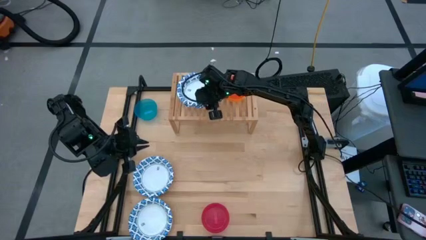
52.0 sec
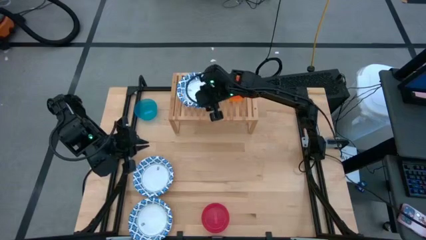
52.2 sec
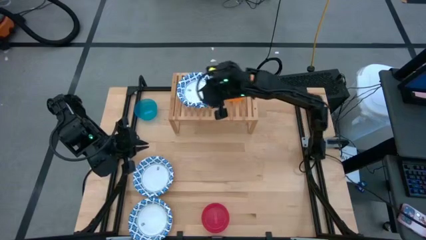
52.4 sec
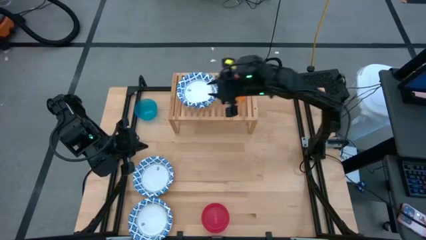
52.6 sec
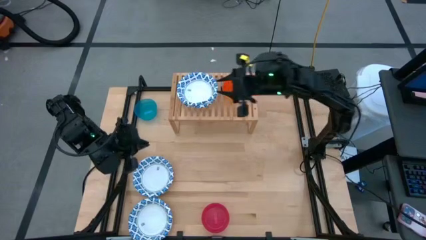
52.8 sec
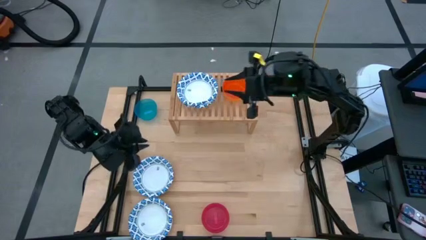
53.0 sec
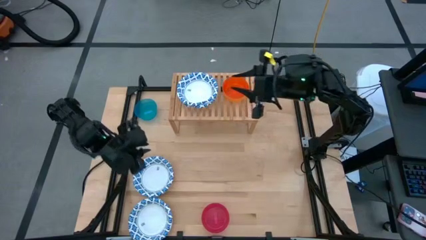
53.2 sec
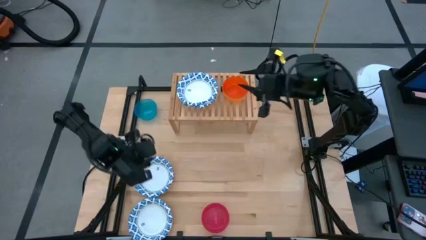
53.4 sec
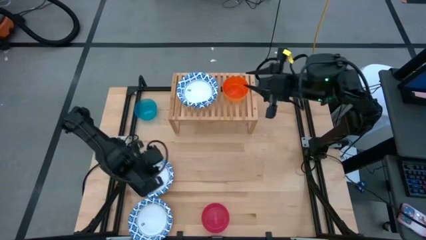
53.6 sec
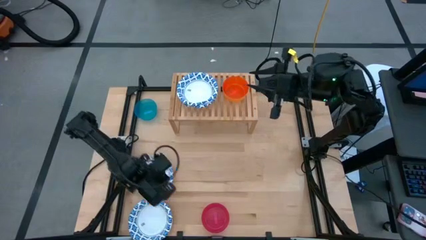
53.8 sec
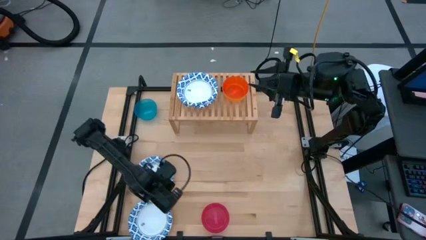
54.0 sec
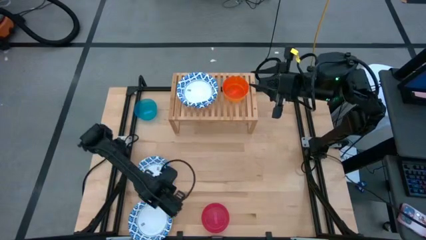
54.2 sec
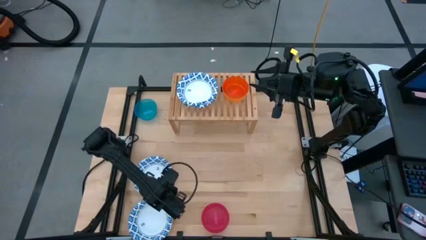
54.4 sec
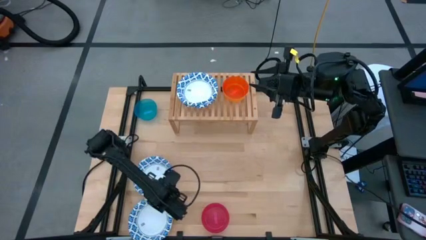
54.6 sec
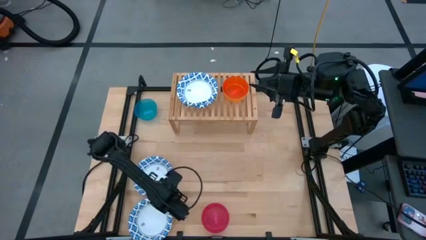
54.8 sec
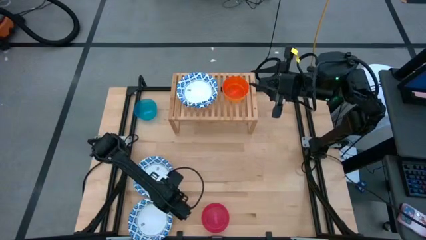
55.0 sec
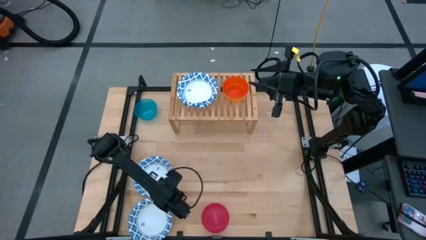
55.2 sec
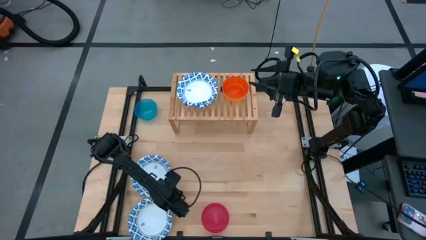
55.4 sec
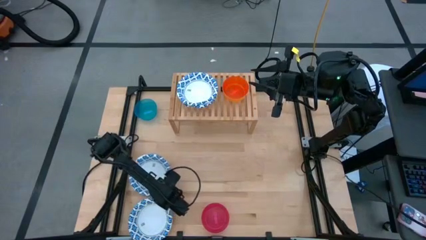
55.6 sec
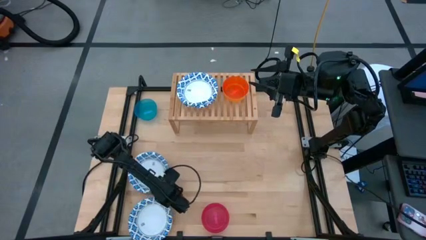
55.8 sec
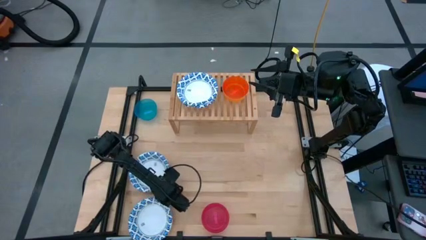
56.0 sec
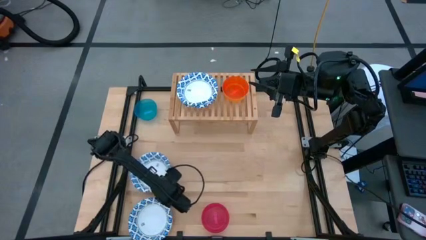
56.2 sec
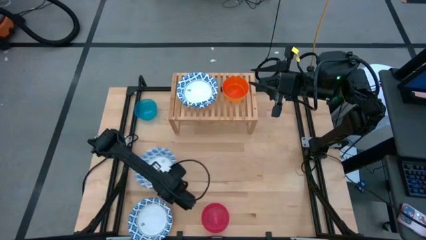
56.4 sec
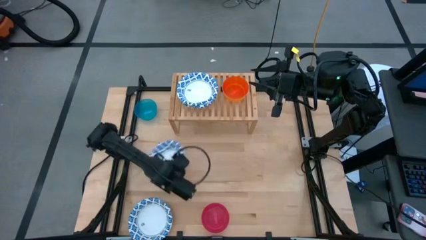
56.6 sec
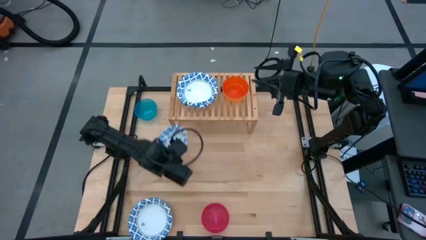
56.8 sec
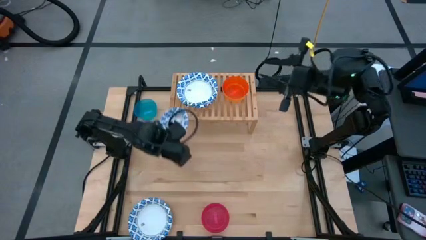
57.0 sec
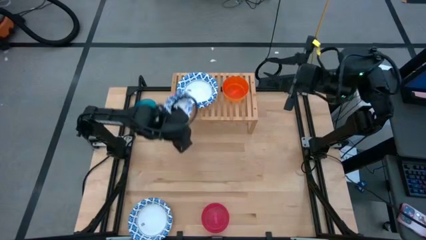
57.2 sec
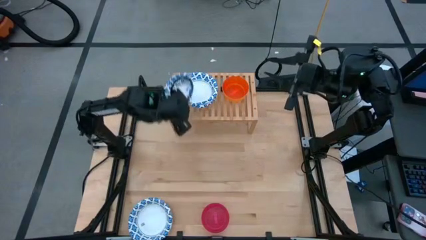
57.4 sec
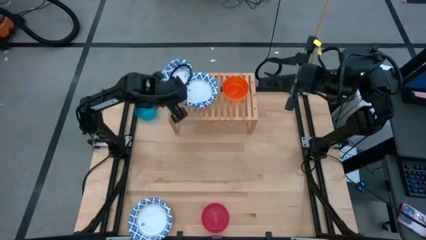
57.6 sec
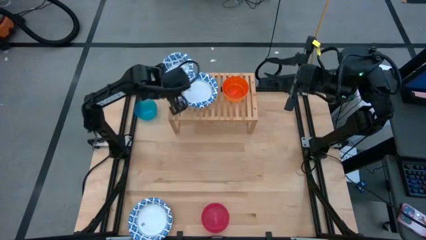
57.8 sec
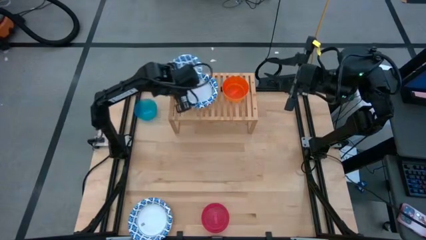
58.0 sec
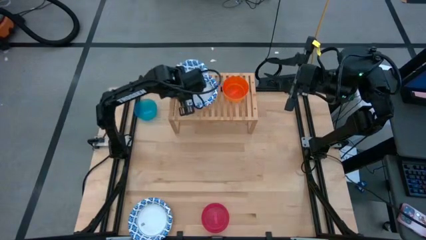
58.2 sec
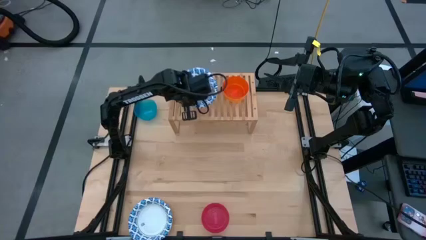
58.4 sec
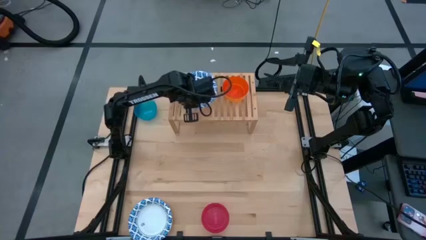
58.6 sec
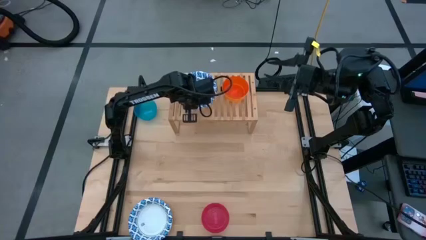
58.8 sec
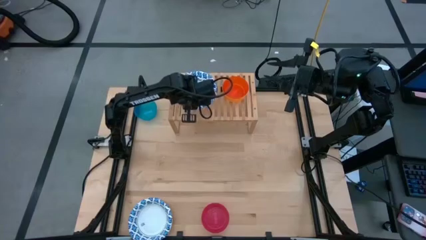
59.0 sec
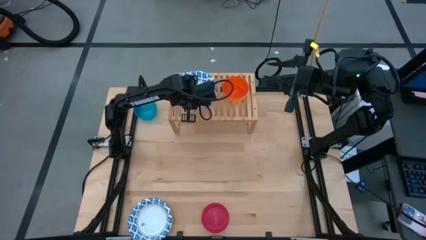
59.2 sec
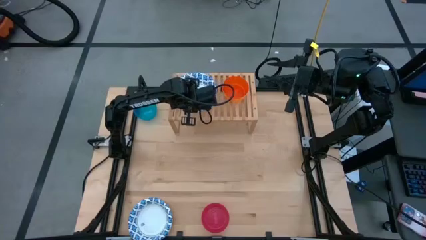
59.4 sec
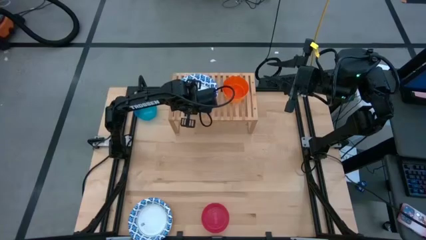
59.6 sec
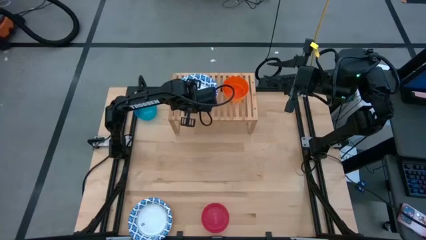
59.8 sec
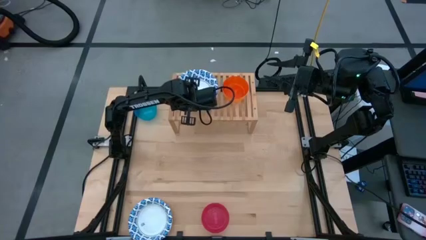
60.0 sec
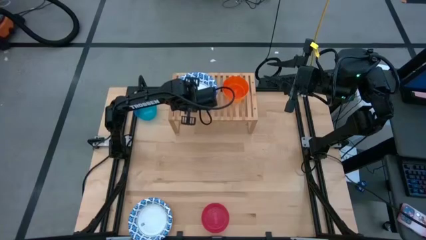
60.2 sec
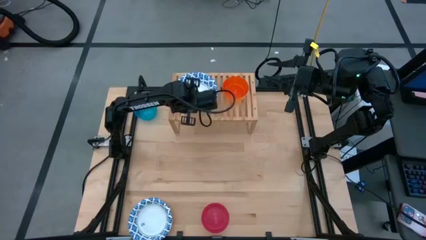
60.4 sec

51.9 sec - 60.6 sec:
Task: Place and stack bowls onto a shelf
Stack the top white patterned bowl on top of the white patterned bowl on the shelf

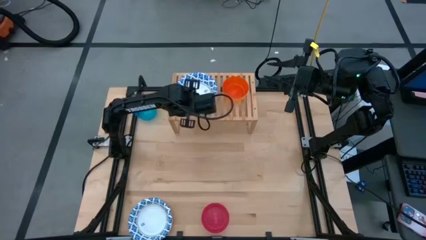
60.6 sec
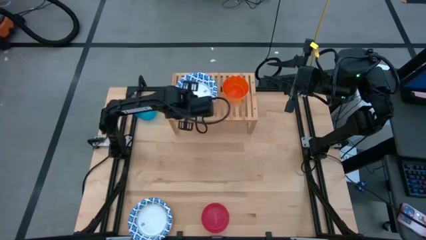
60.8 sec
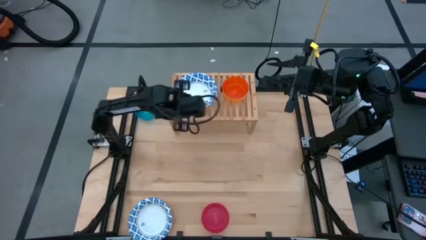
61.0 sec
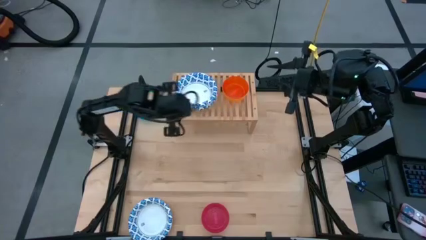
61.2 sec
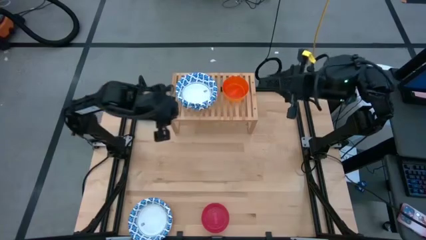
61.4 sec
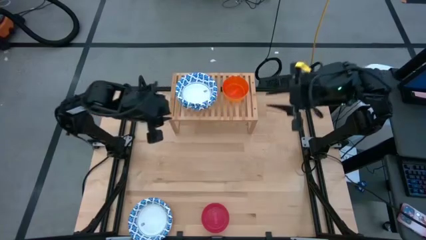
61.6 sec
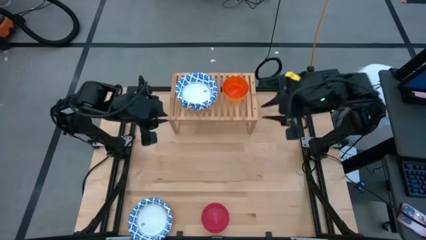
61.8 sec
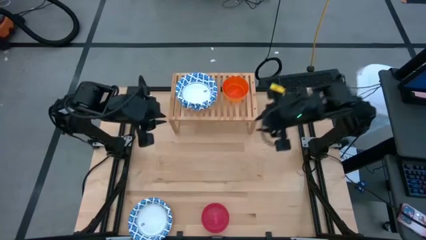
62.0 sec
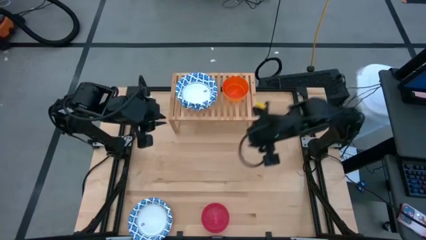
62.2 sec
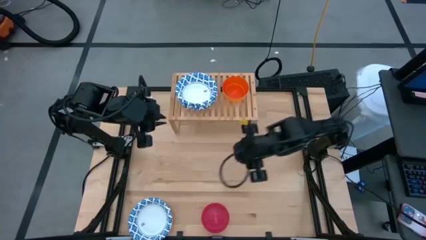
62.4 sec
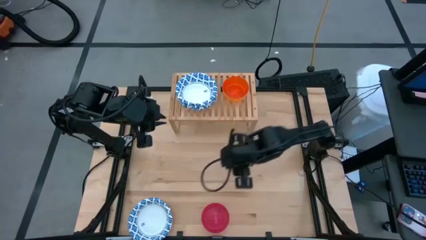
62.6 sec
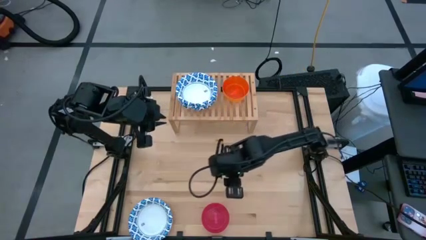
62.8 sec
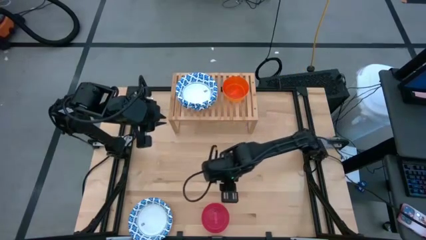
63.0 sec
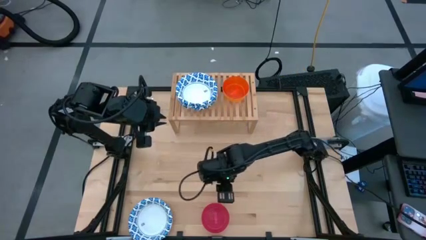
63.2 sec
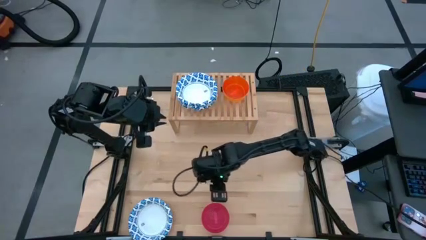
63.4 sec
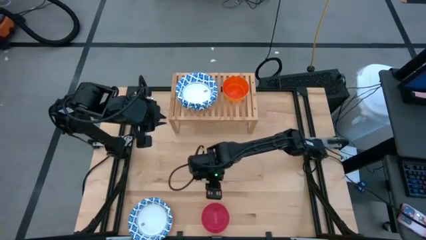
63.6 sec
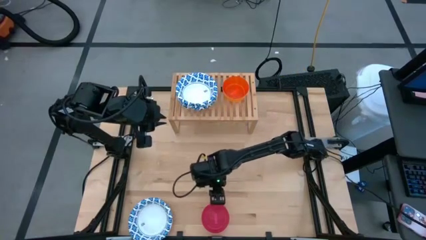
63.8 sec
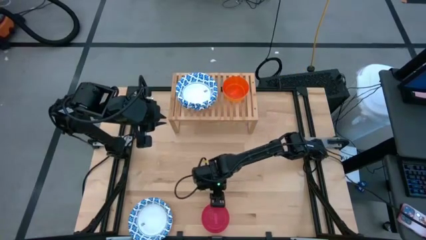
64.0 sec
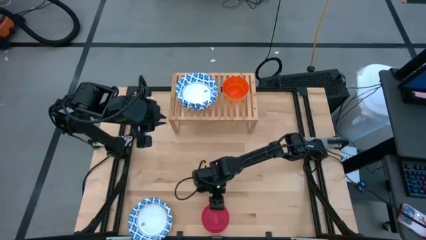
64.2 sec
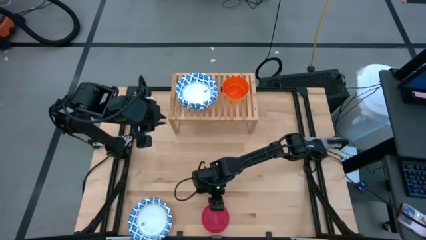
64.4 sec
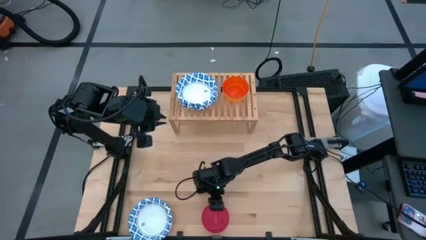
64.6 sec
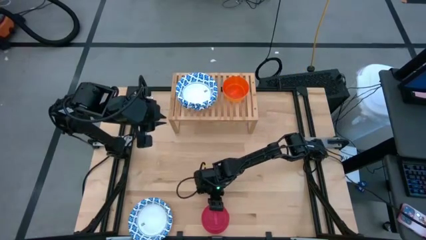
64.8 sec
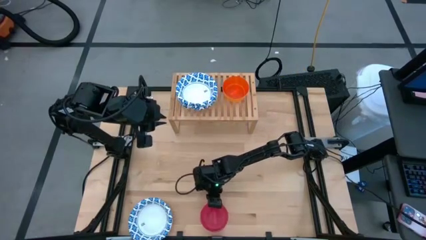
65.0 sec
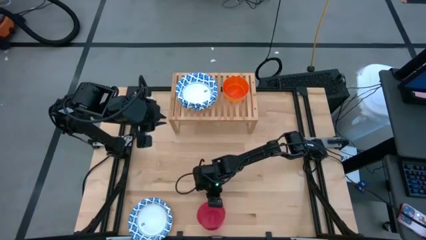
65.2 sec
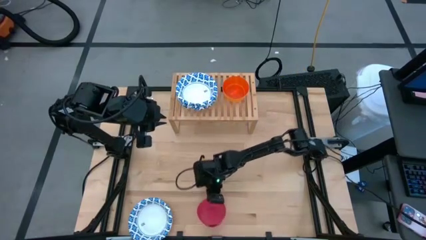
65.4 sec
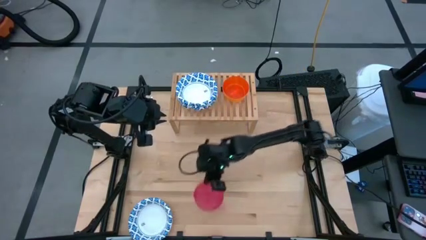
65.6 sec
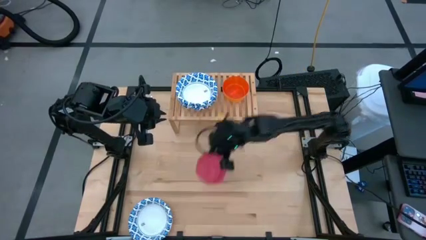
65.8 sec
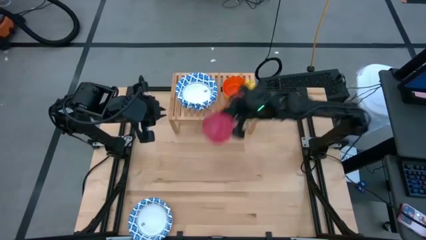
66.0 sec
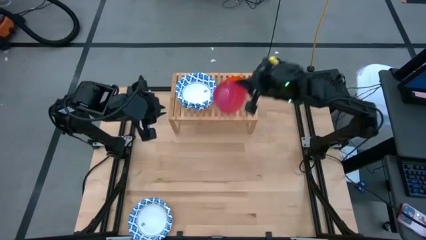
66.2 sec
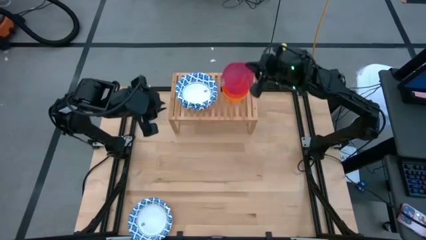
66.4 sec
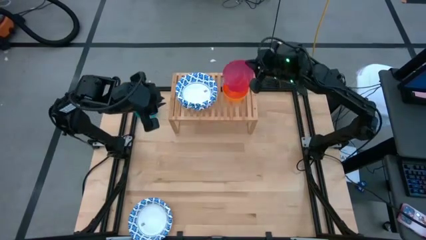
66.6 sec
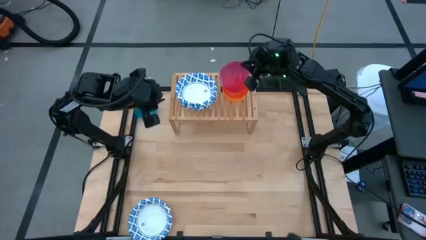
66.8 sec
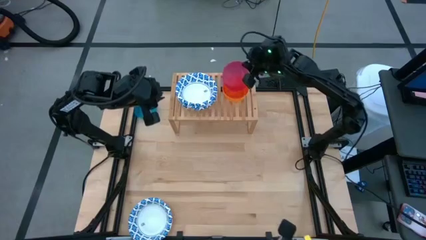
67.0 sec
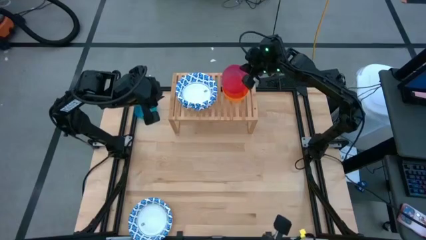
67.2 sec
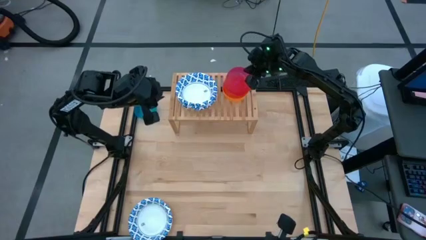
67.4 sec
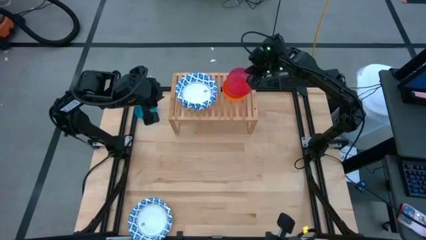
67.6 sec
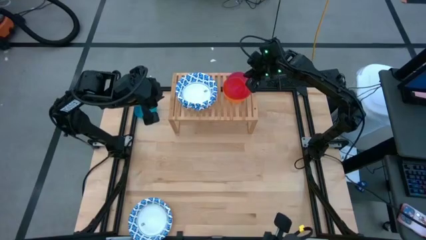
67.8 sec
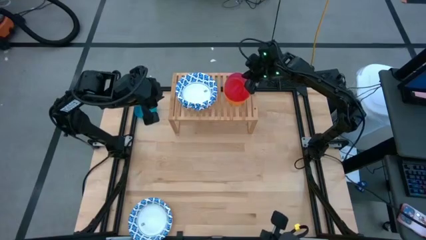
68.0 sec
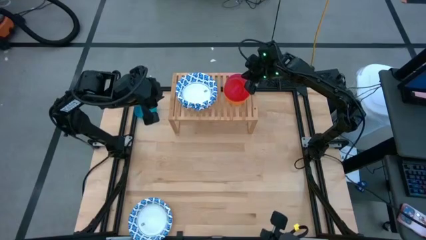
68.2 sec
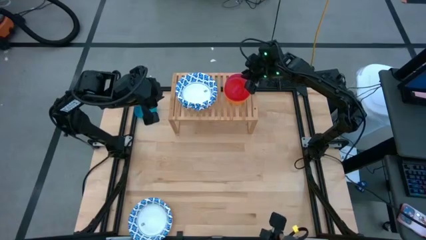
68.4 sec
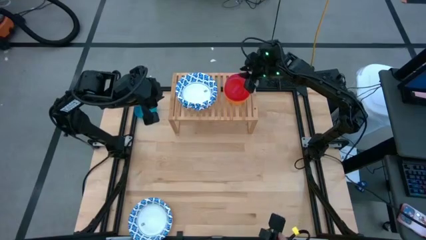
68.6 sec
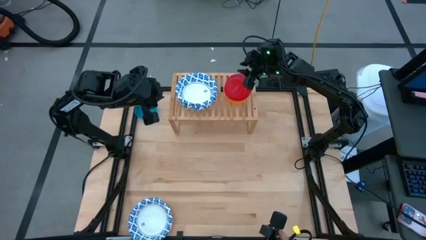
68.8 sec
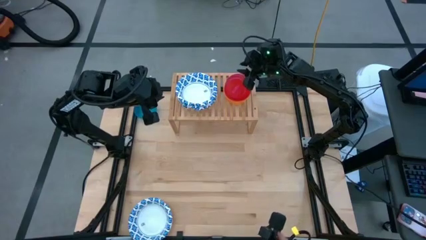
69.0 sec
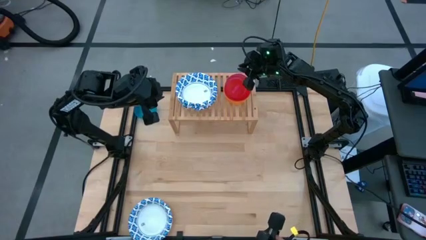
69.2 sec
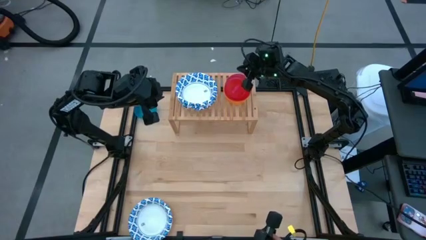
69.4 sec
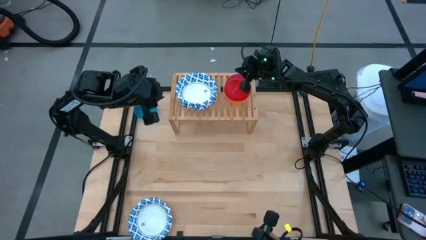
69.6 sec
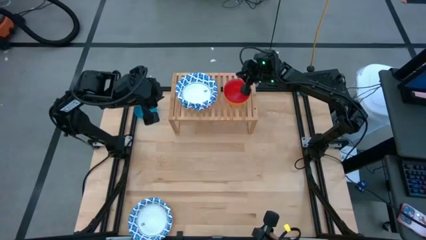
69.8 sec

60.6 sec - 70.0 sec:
Stack the red bowl on top of the orange bowl on the shelf
